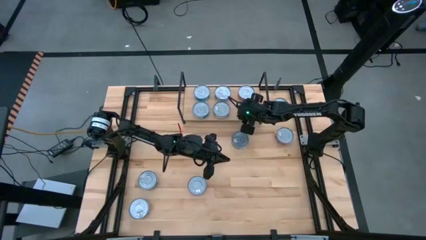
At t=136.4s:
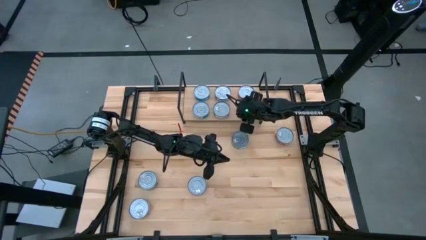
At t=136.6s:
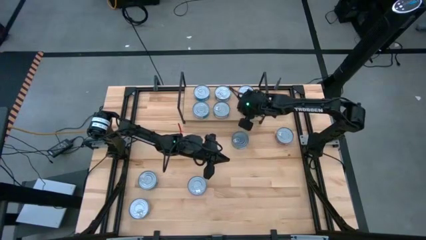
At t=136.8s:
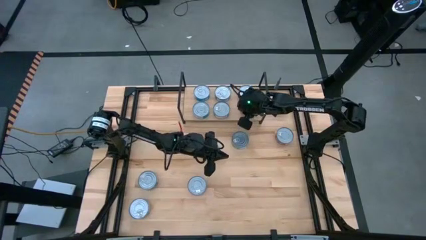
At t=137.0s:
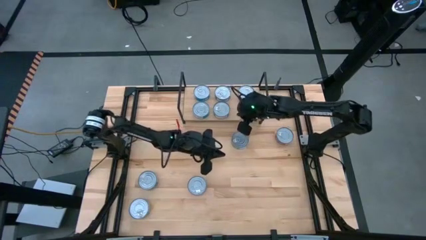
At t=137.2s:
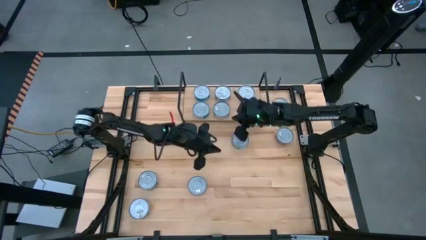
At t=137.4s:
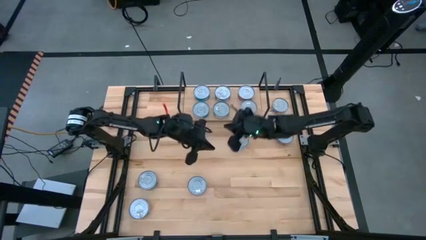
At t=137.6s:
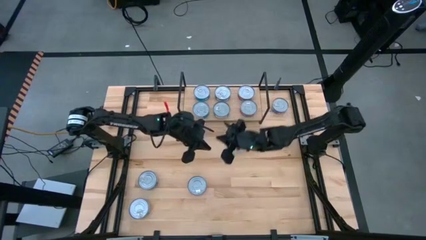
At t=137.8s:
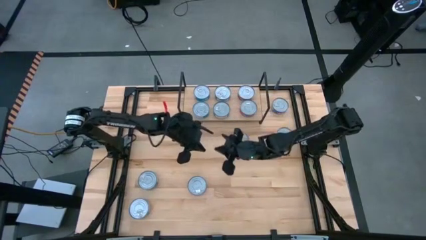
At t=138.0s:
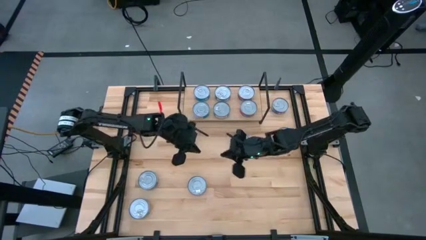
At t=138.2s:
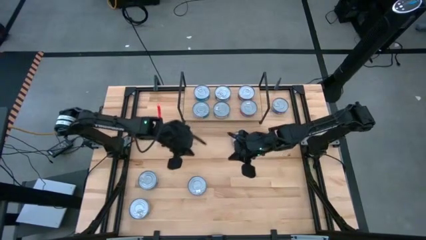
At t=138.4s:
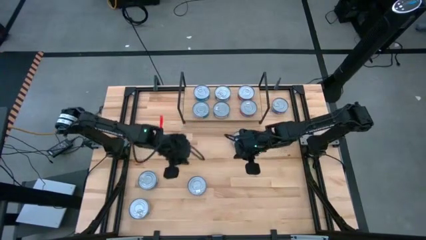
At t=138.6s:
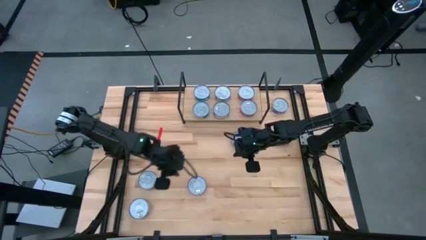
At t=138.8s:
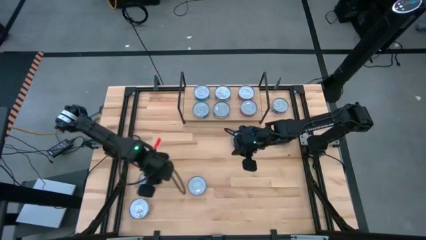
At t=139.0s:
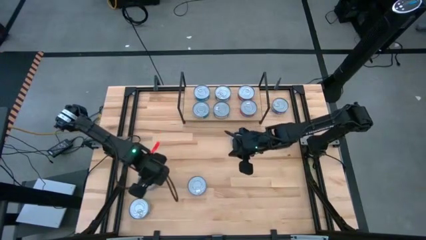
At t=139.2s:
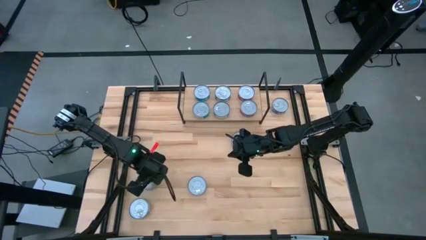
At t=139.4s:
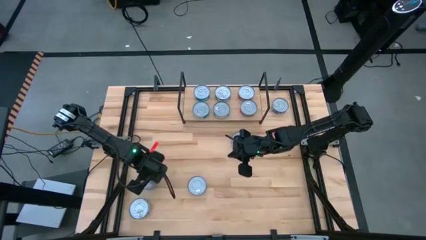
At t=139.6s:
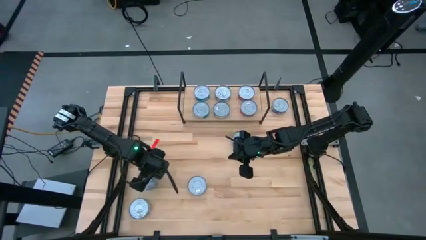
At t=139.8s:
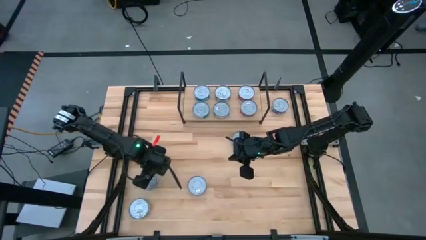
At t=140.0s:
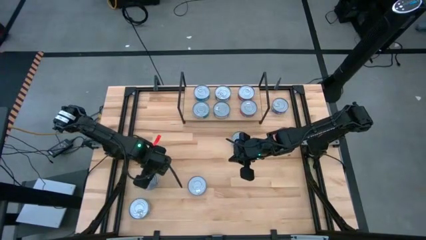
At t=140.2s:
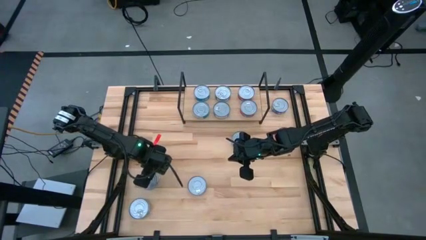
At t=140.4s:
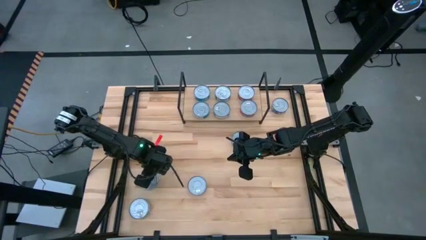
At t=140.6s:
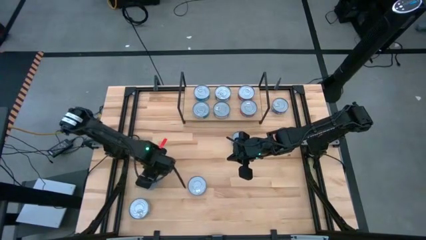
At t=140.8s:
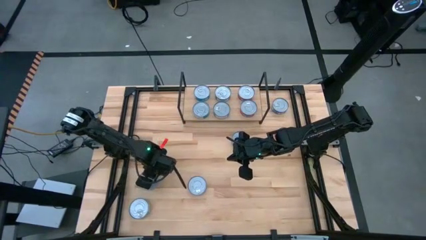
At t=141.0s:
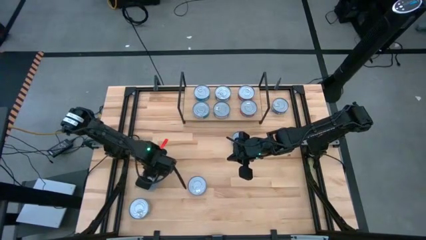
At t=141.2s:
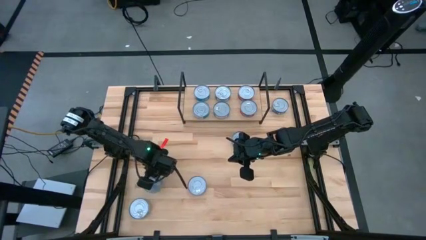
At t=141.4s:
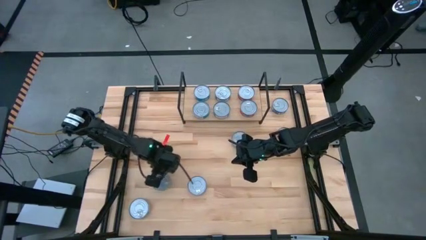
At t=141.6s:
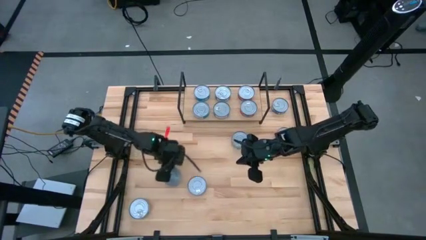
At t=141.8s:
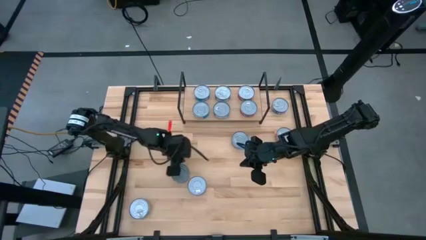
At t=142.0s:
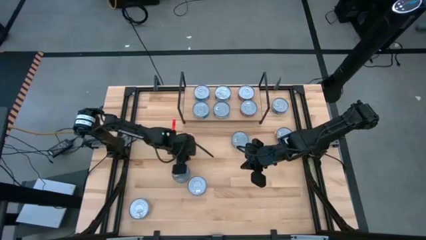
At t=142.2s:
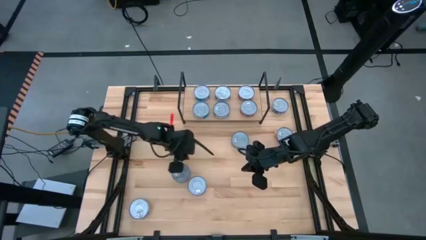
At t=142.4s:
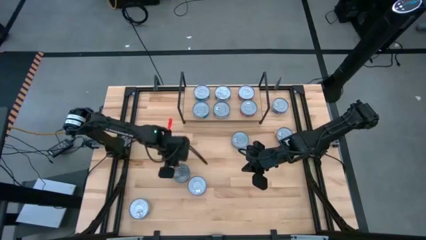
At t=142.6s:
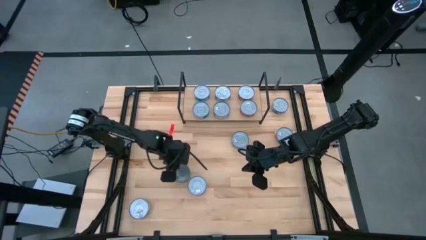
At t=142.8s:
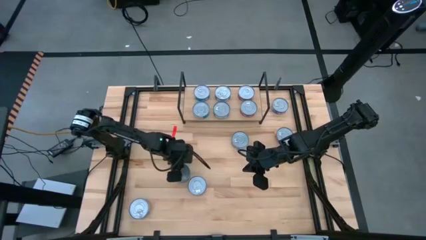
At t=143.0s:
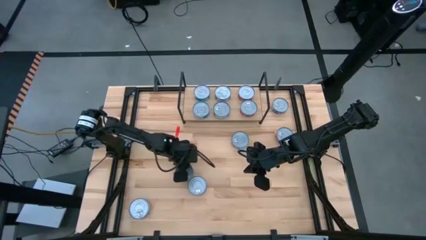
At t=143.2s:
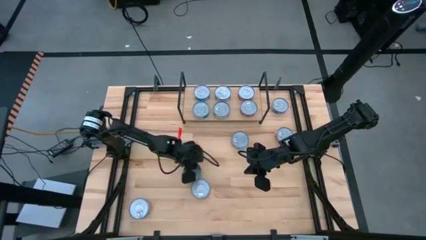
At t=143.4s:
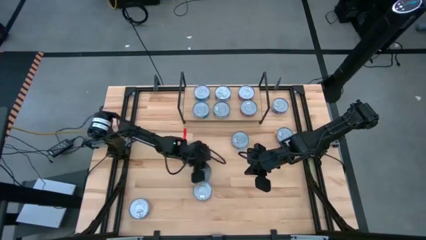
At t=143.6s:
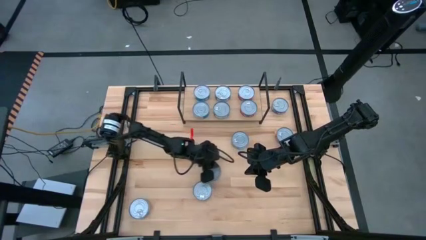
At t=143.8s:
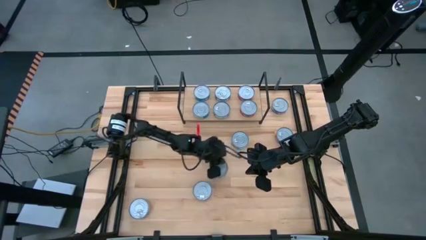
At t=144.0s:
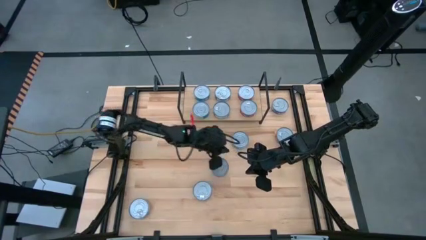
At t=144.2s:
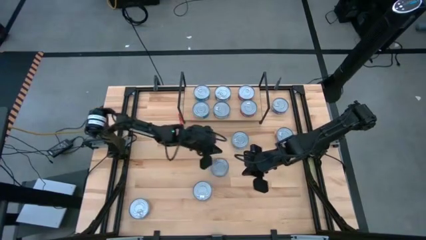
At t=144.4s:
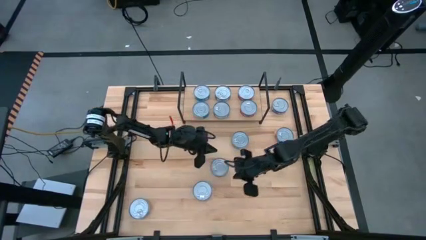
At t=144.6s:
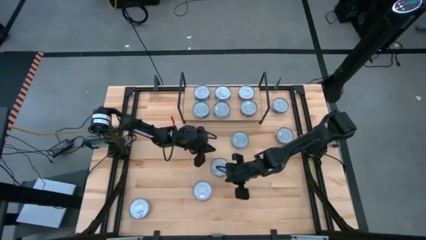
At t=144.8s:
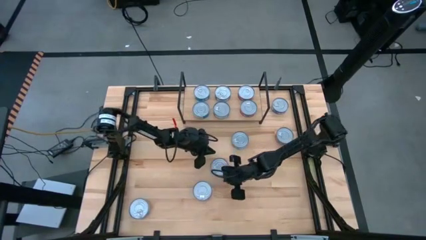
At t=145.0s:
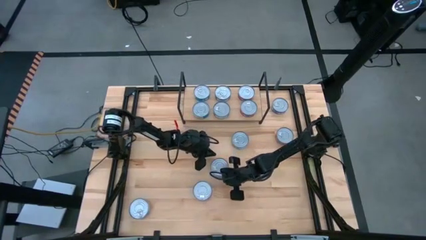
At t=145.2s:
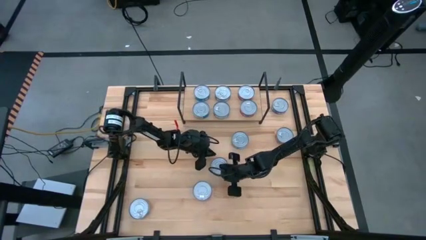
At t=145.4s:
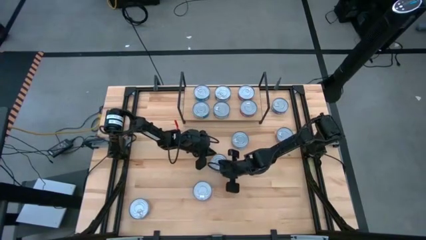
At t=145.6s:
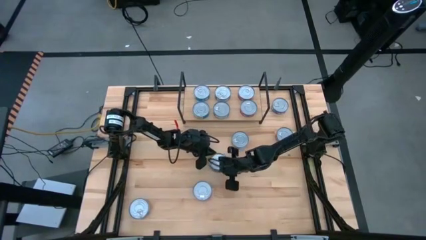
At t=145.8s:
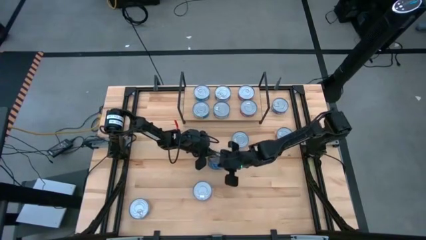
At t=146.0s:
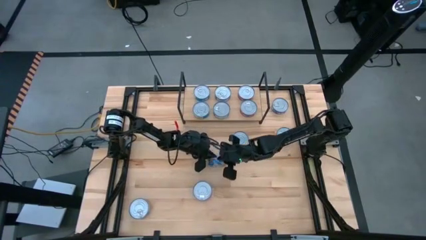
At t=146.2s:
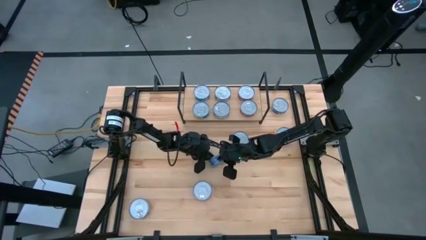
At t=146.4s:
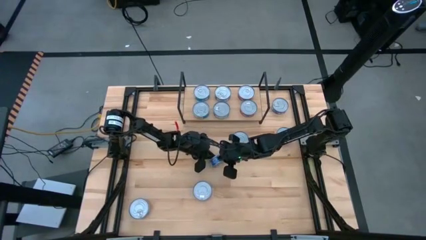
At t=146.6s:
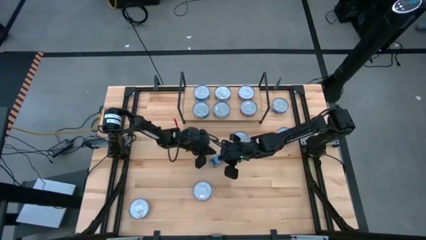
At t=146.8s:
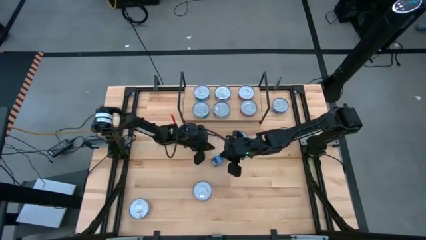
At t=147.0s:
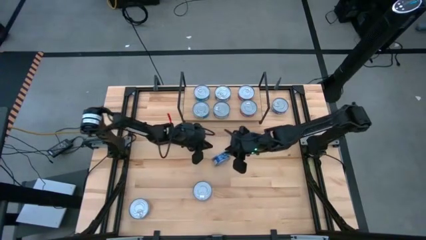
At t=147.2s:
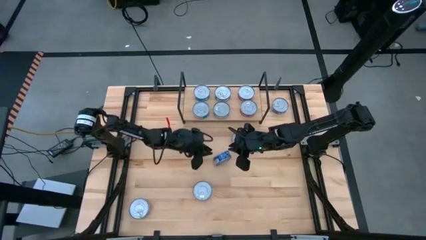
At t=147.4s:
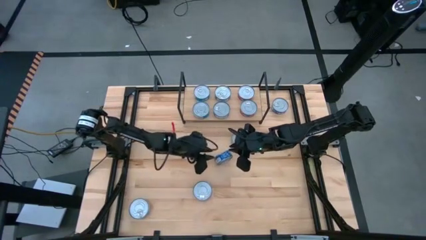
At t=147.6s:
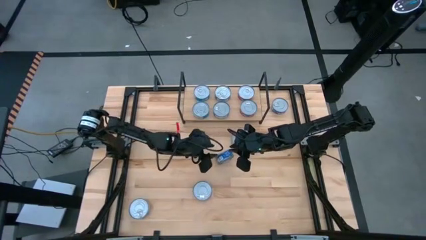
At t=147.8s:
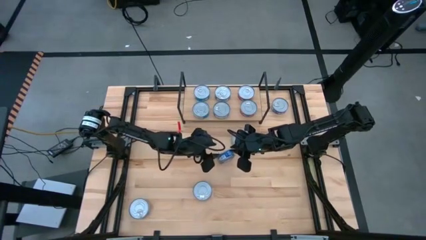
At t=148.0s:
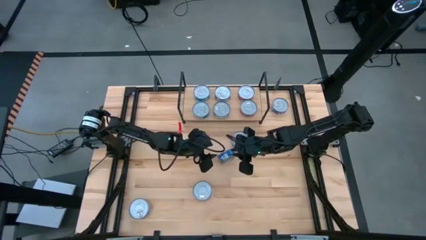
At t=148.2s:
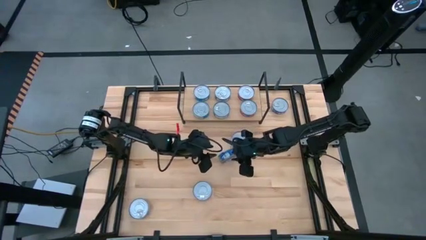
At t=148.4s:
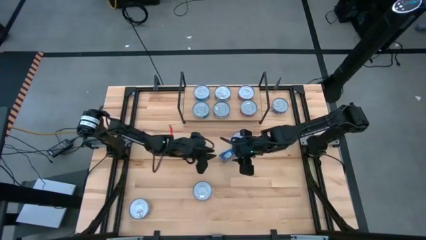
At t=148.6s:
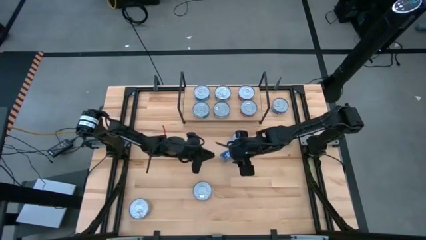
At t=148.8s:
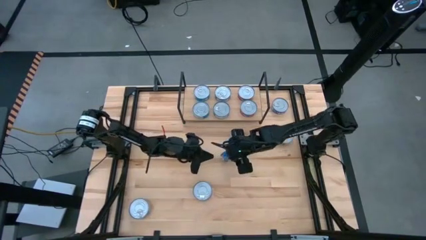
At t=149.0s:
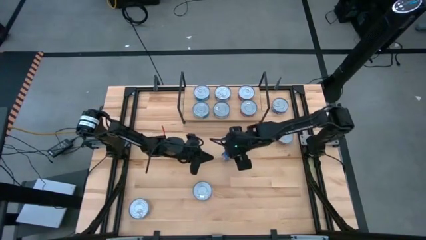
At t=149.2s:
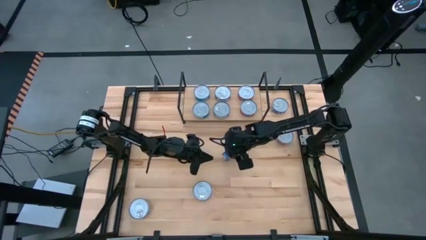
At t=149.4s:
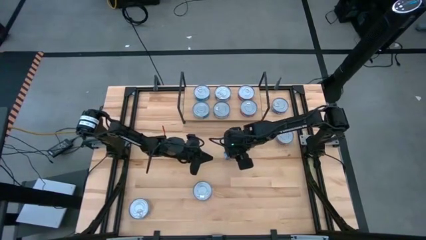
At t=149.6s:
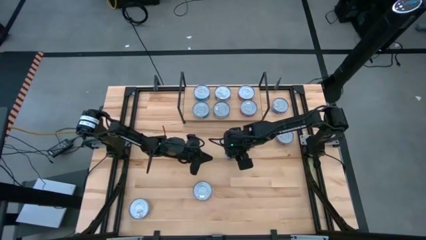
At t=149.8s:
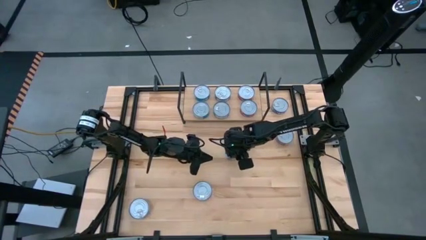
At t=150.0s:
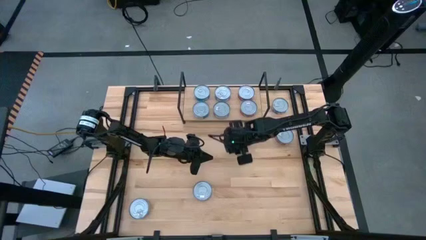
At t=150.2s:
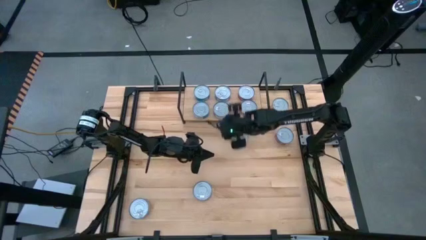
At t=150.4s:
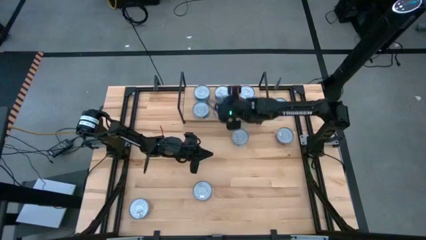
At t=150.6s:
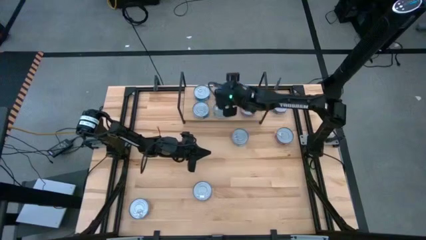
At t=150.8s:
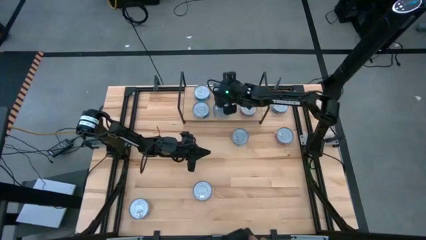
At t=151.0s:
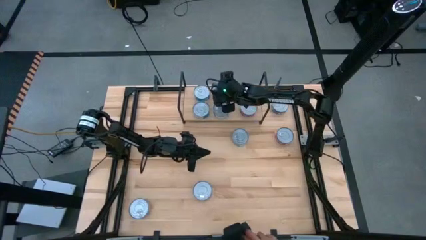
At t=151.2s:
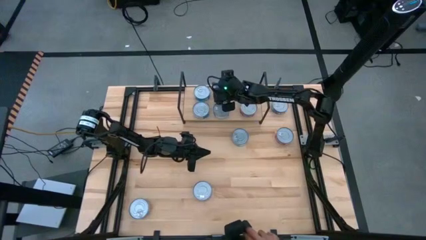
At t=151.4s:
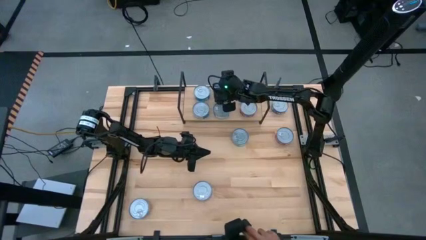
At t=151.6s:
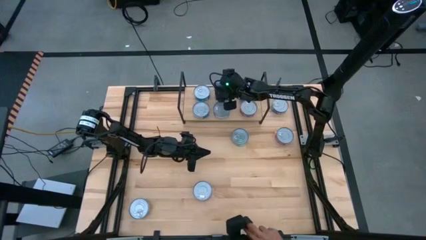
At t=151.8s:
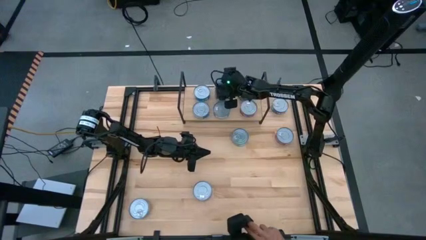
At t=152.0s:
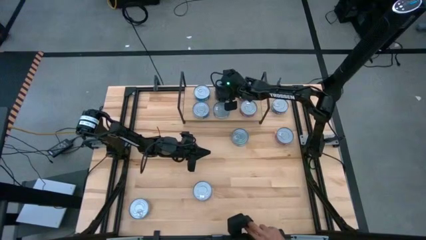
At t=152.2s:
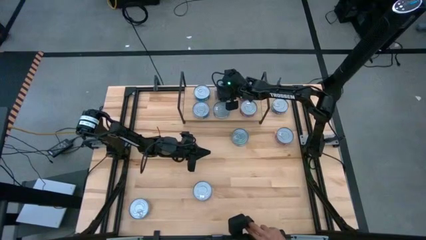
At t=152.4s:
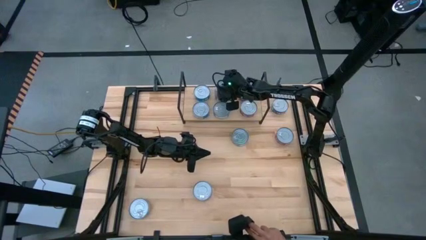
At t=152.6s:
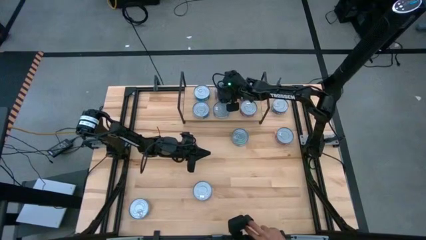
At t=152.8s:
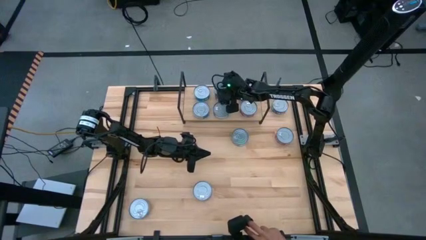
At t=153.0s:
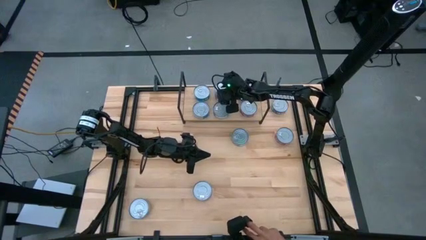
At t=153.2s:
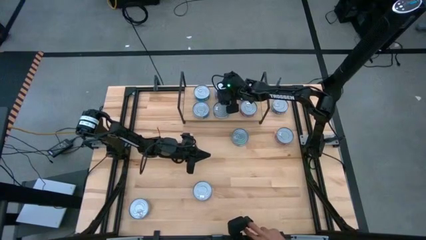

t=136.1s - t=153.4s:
Task: Stack canned seafood by type on shelf
Stack the blue tuna can on top of the blue tuna can on the shelf
